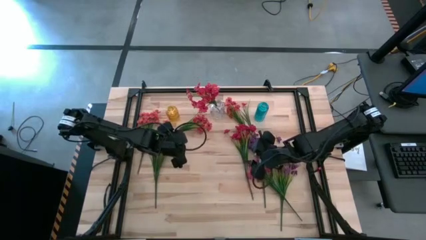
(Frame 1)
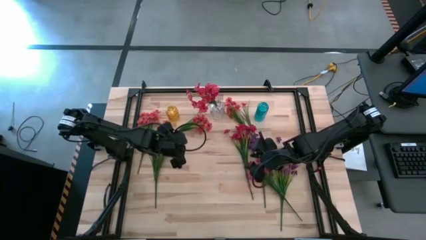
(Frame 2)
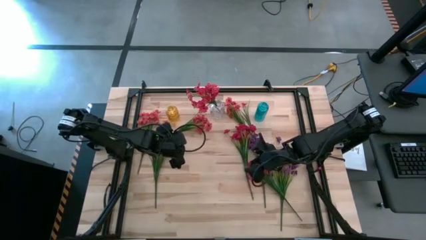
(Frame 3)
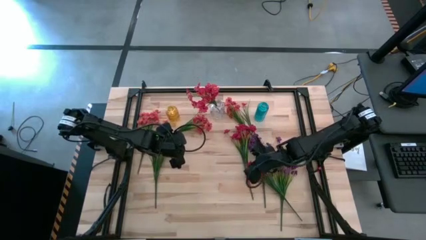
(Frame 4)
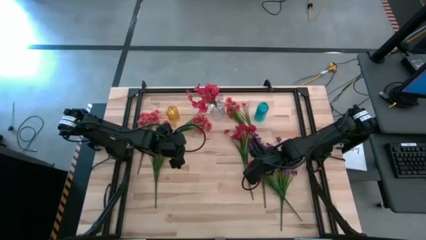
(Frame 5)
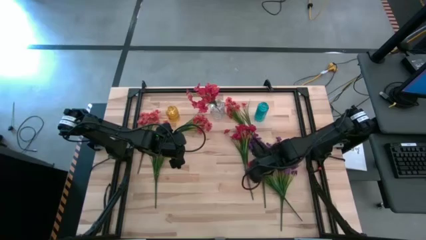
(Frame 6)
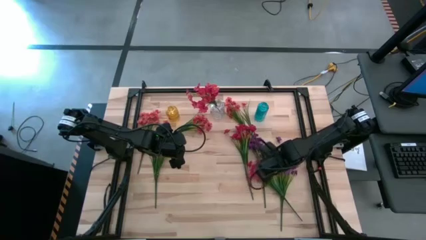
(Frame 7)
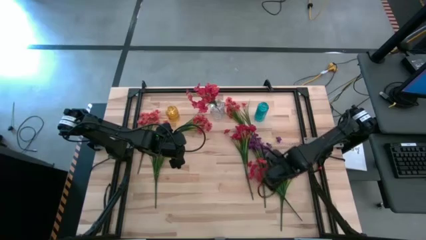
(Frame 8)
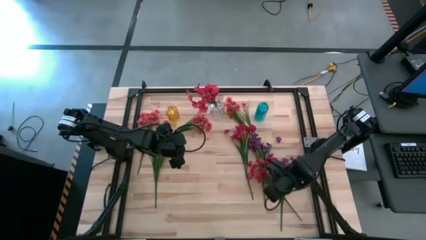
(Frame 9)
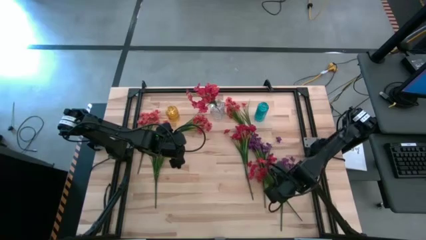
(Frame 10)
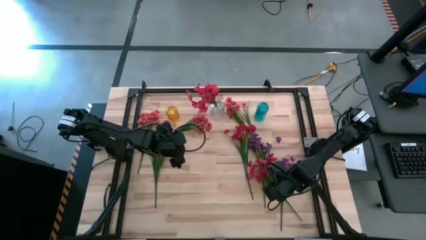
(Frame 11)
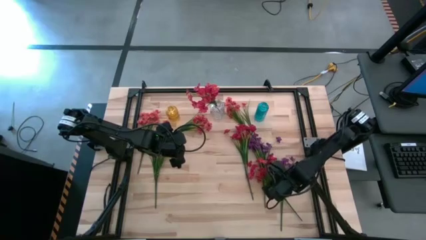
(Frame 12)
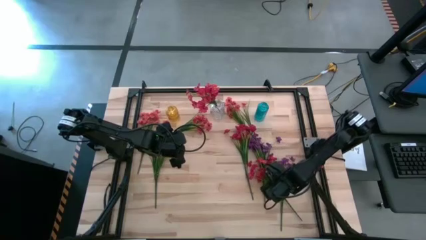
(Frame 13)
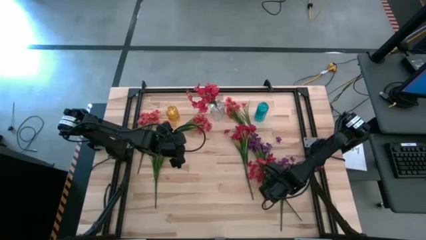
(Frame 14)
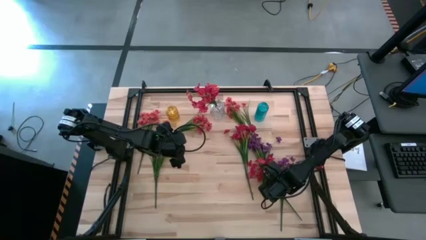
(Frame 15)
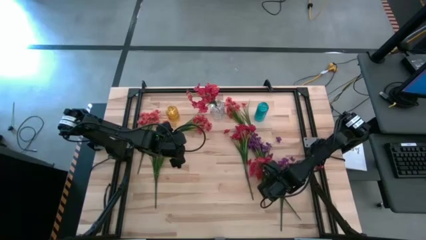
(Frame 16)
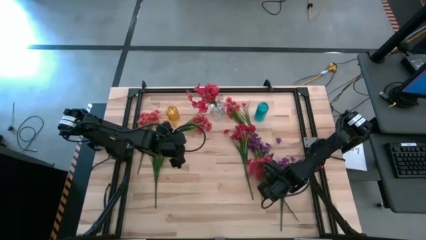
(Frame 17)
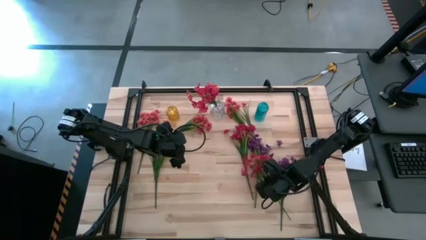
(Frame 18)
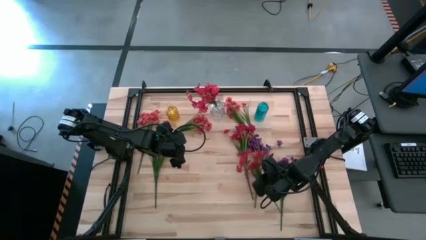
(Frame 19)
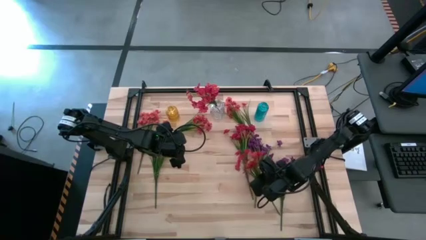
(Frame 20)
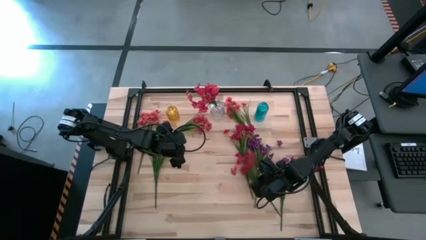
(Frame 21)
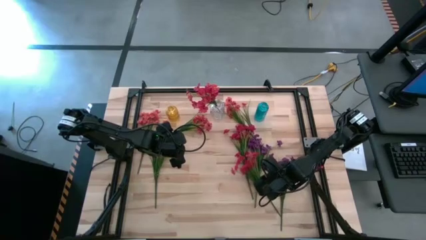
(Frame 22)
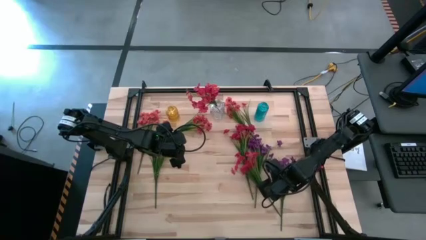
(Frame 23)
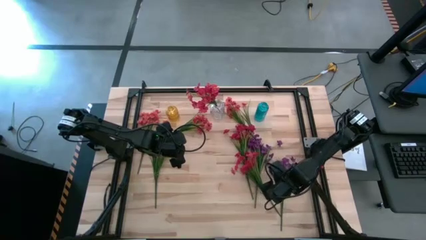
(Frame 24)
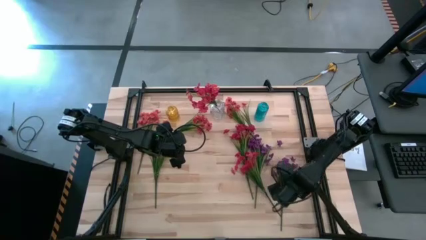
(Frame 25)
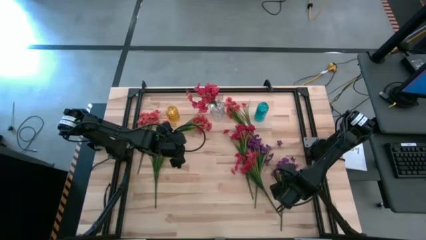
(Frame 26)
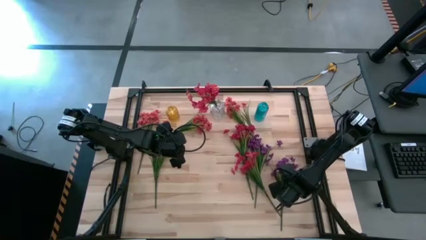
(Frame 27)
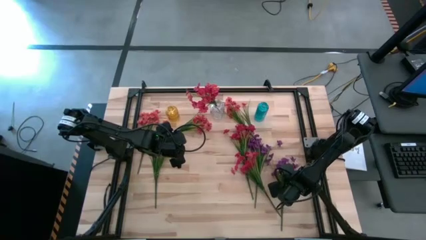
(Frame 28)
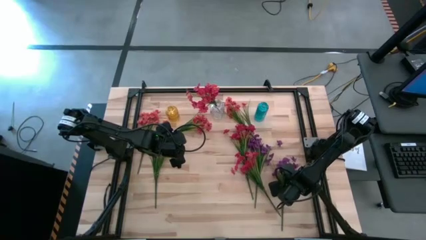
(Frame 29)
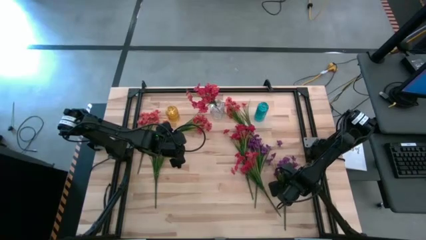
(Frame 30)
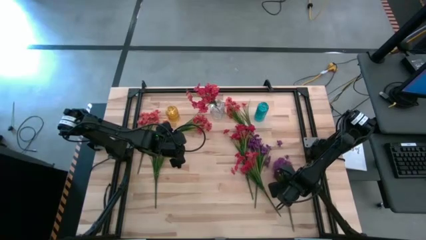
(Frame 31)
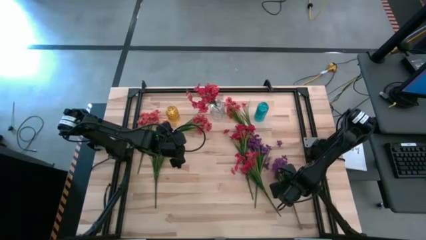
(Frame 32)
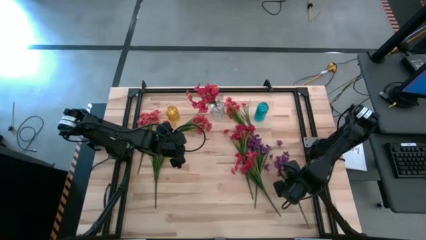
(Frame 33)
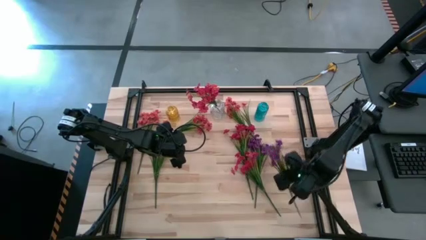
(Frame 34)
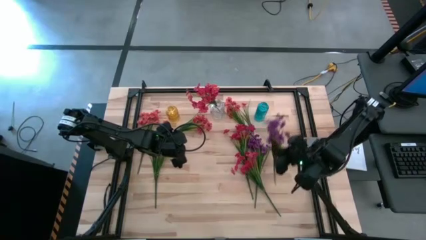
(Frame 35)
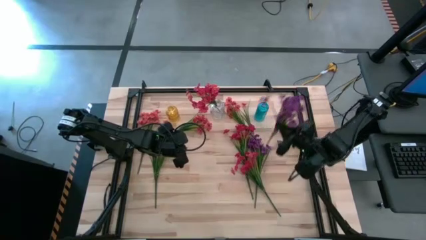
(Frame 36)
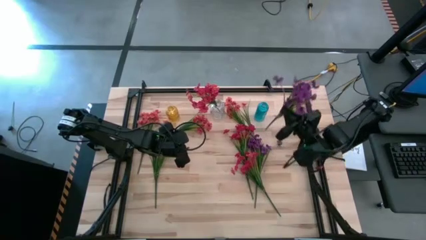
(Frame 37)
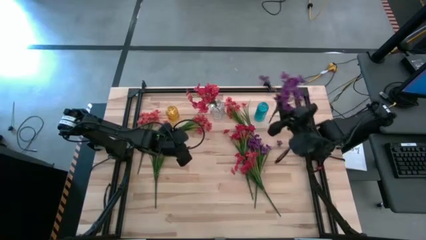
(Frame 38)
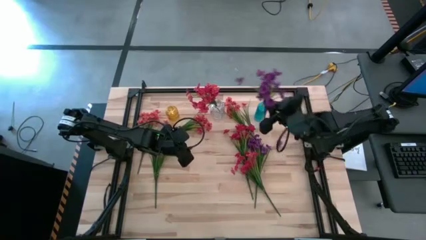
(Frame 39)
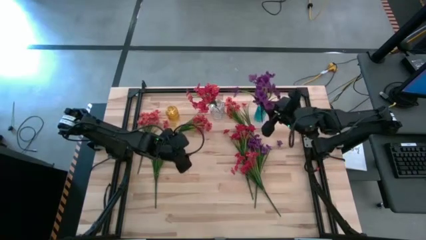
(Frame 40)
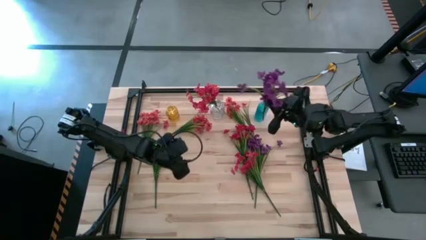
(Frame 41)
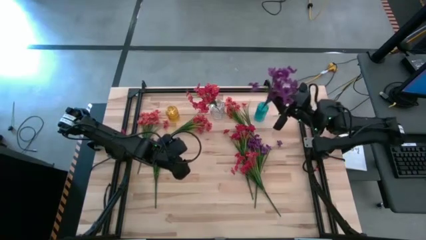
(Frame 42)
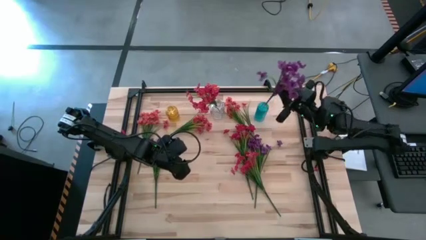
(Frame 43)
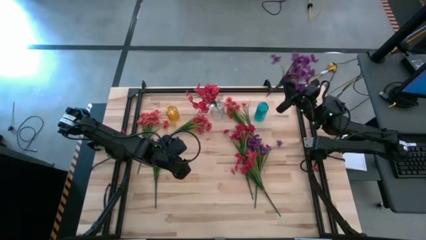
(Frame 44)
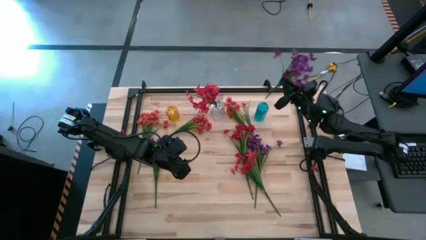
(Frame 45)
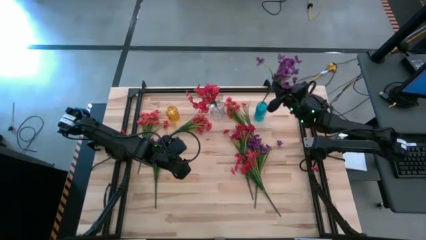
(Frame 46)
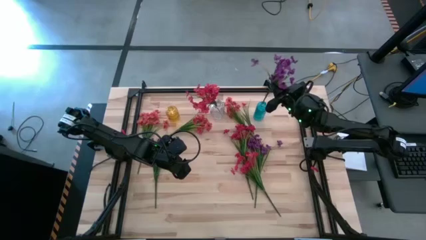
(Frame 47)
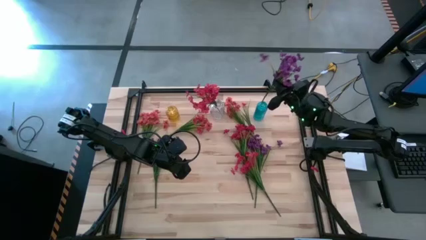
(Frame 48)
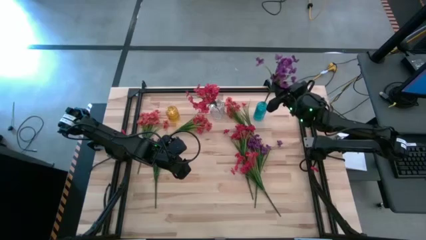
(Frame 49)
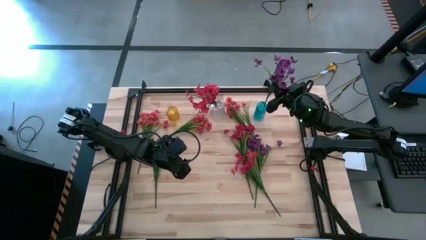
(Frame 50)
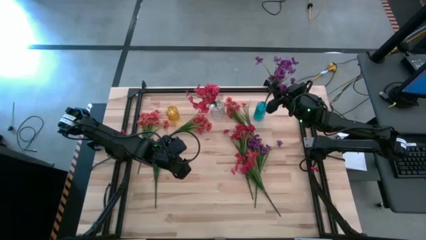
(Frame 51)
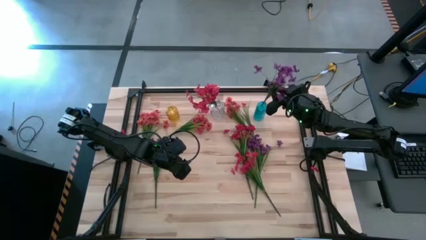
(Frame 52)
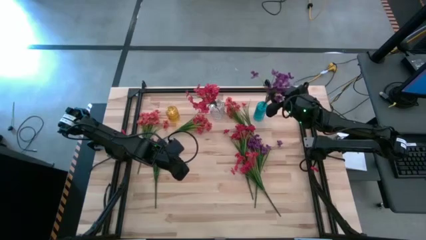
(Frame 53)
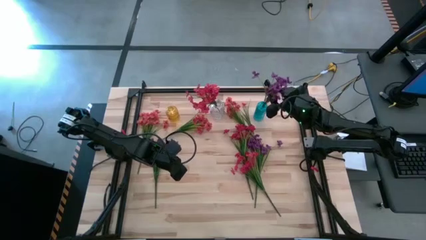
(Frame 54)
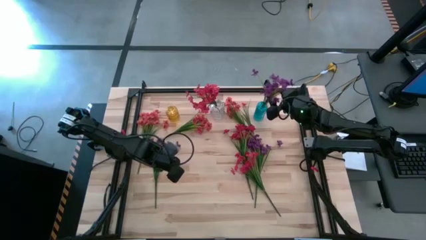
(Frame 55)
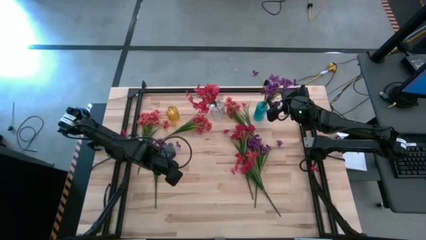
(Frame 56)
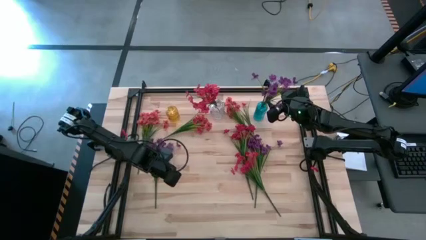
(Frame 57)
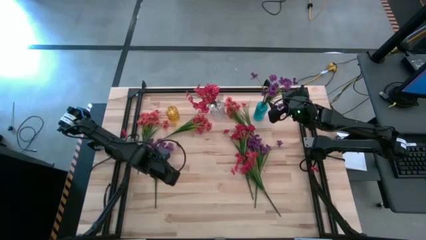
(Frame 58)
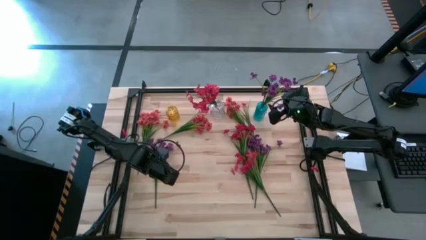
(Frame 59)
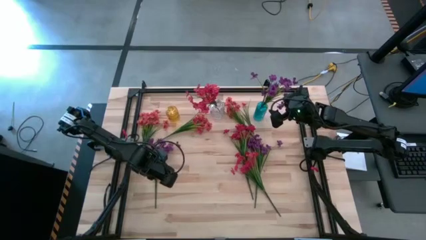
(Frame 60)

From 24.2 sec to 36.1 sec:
Task: Sort flowers into vase by color
Put the purple flowers into the blue vase
